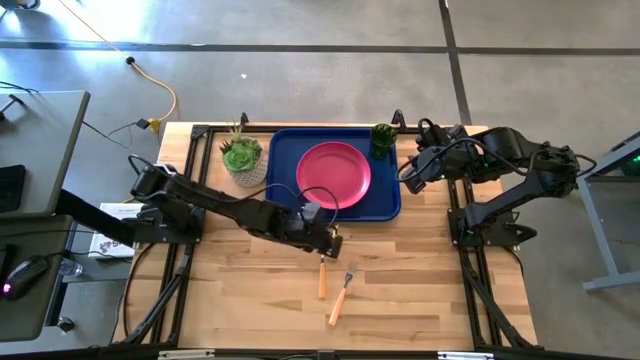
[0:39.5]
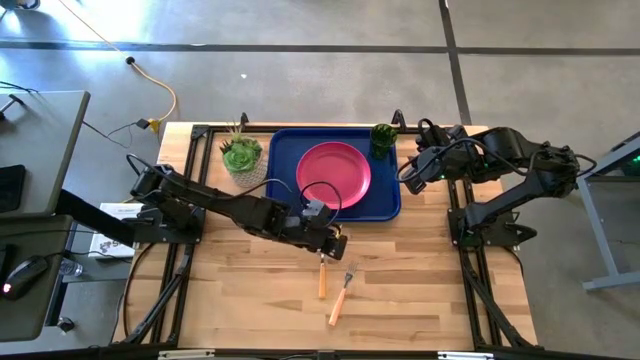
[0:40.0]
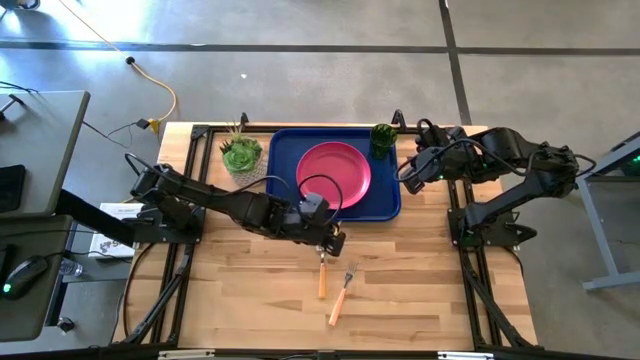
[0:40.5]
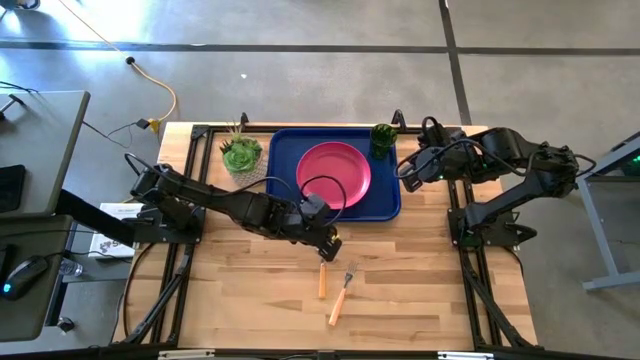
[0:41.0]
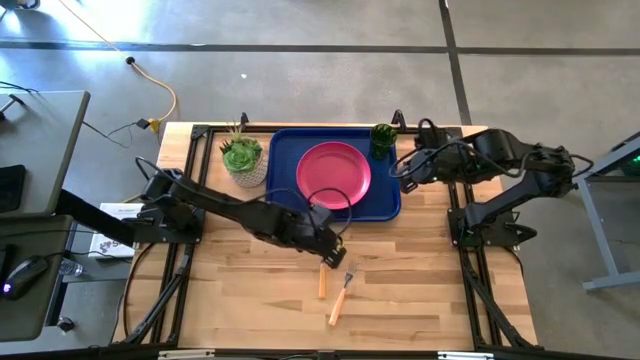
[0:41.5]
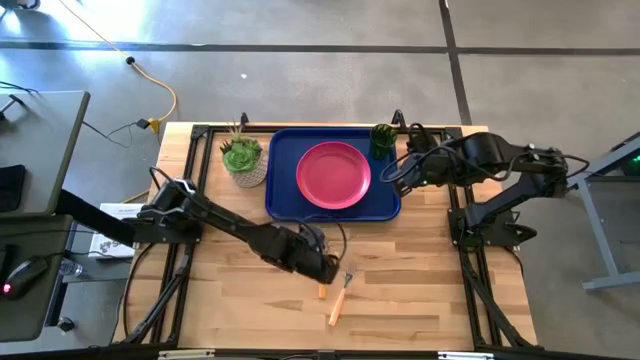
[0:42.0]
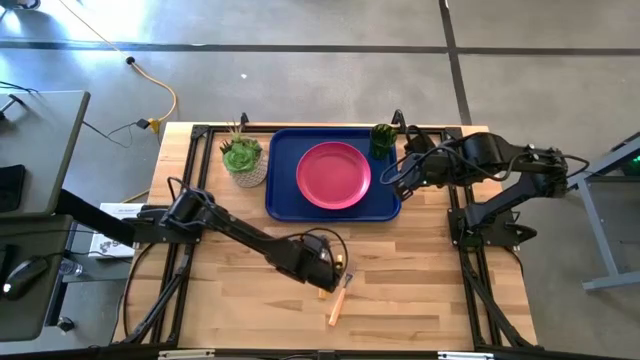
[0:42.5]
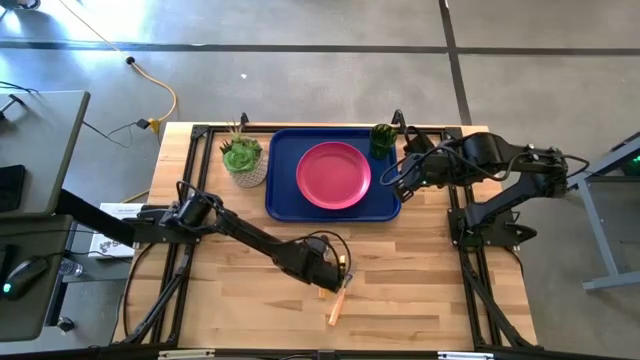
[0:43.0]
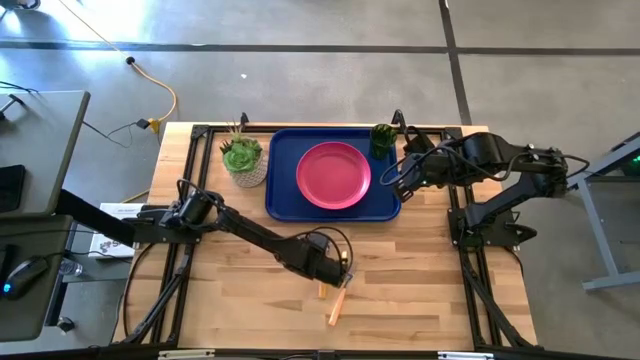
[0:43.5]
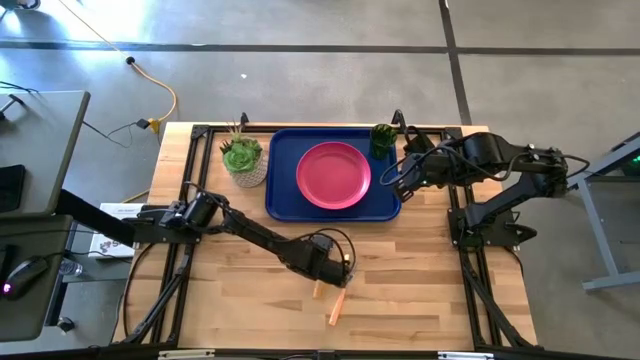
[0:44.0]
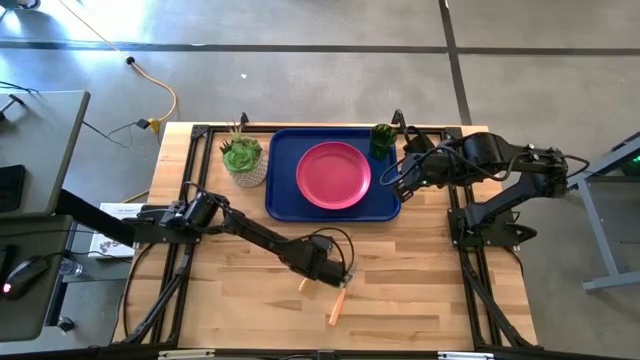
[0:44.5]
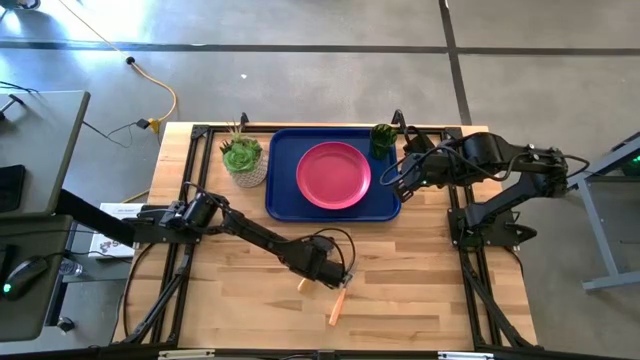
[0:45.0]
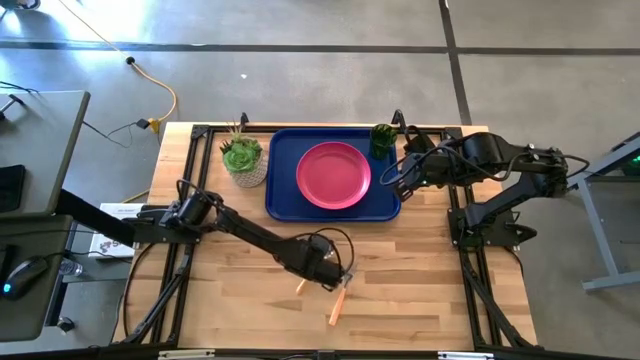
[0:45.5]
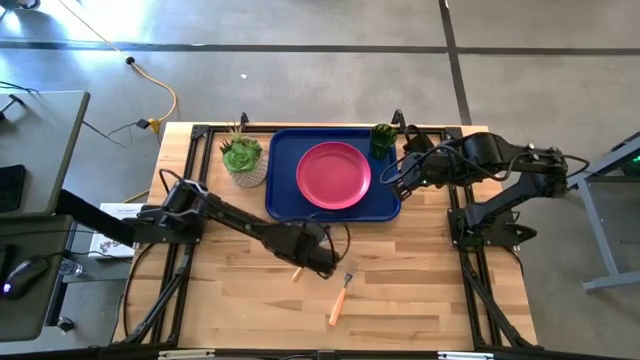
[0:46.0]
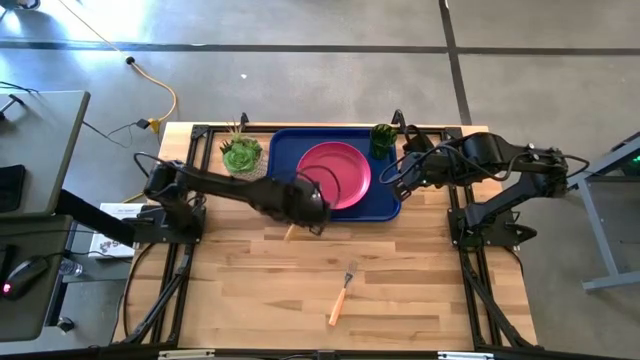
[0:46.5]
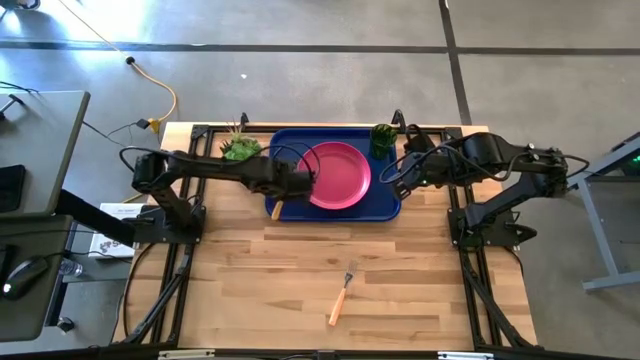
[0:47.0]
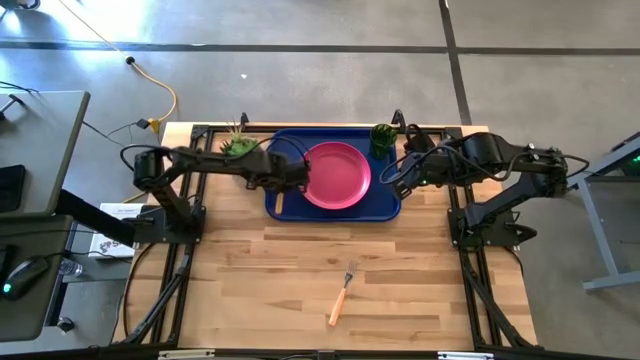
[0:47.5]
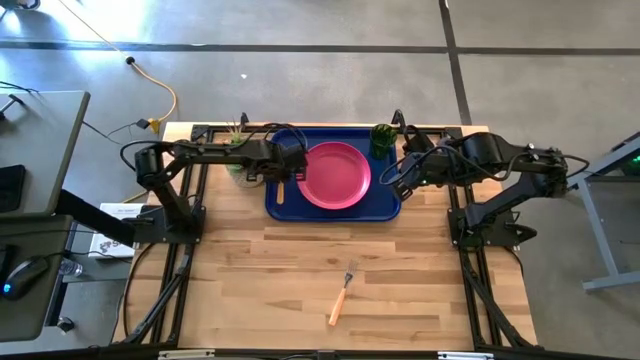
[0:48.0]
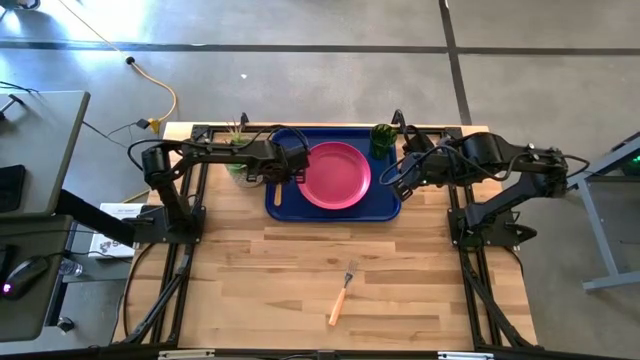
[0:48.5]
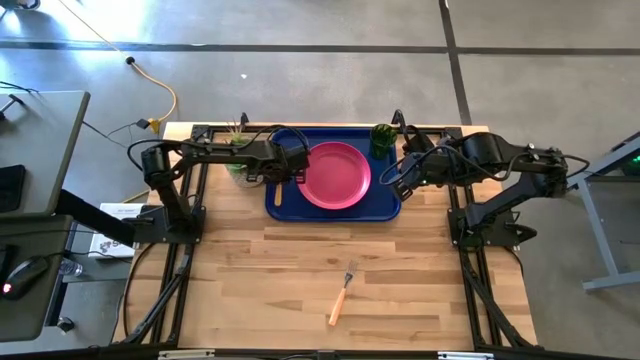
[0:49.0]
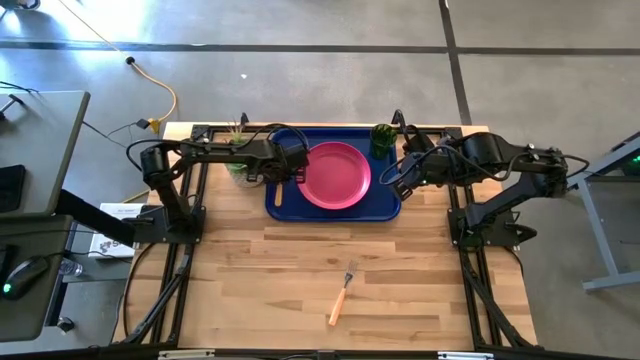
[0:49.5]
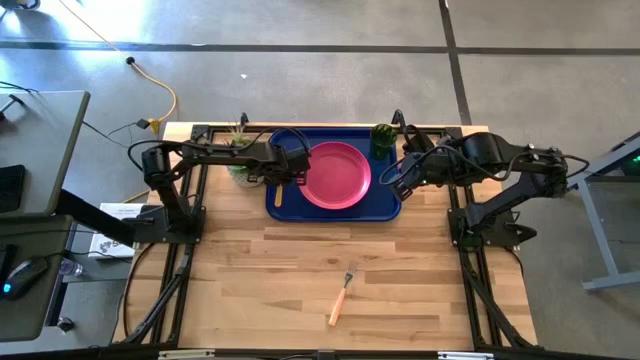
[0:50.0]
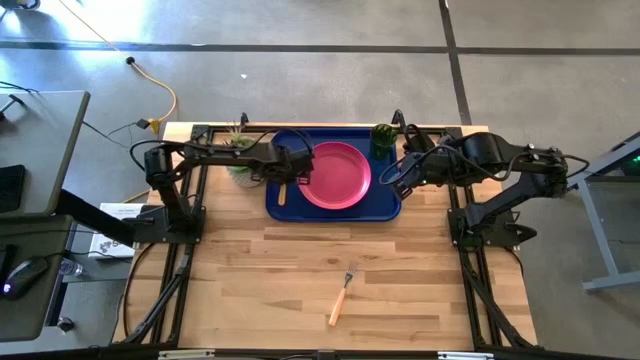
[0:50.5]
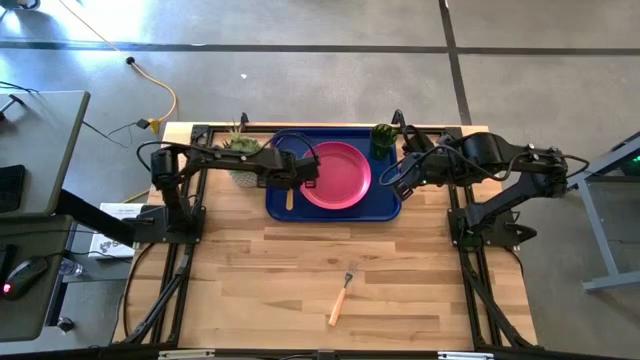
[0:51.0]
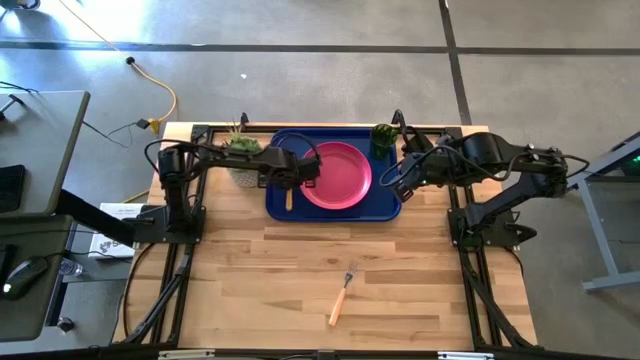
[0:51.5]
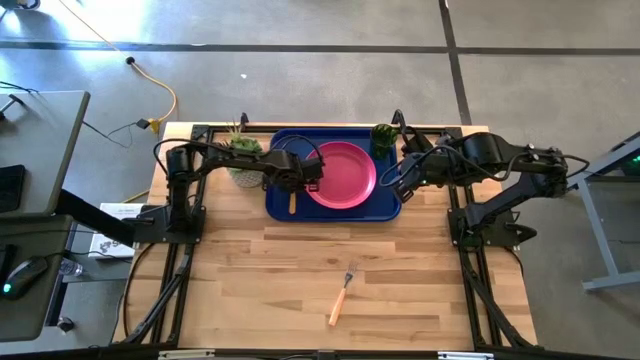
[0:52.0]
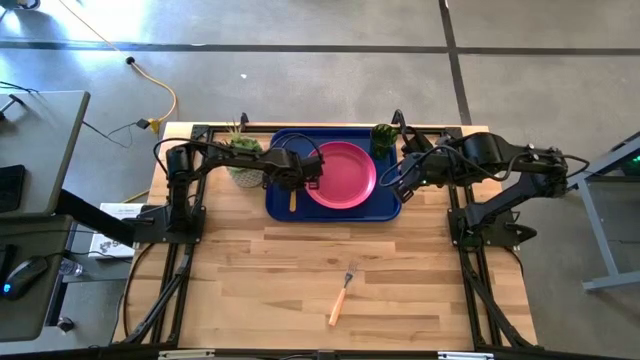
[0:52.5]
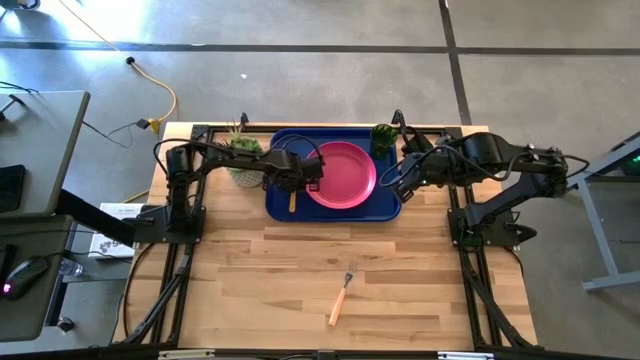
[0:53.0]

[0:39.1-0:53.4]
Task: Pick and place plate/cup/fork/spoon on tray
Put the orange spoon on the blue serving tray to the left side of the pink plate

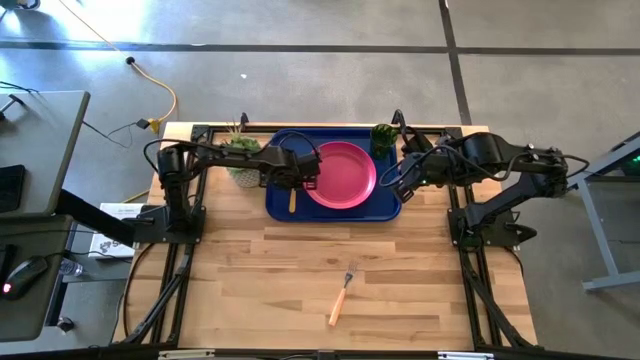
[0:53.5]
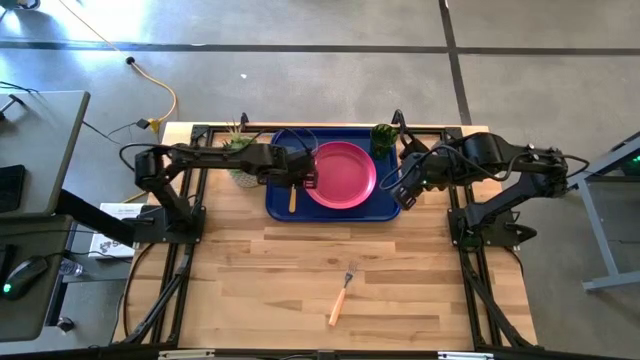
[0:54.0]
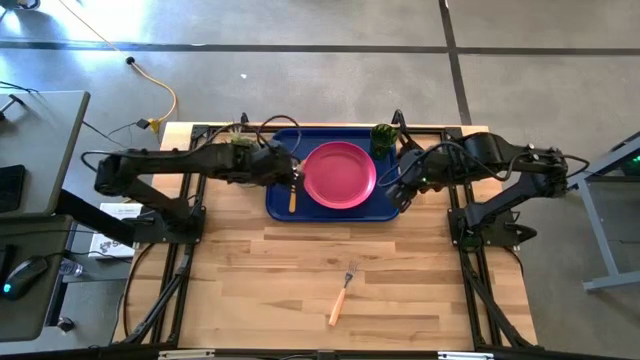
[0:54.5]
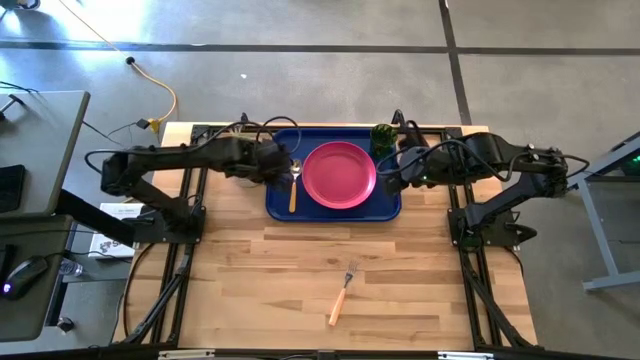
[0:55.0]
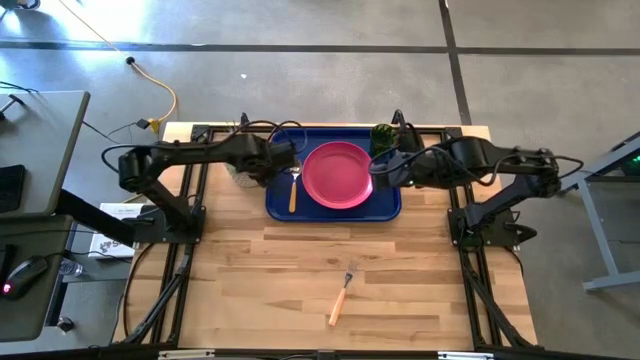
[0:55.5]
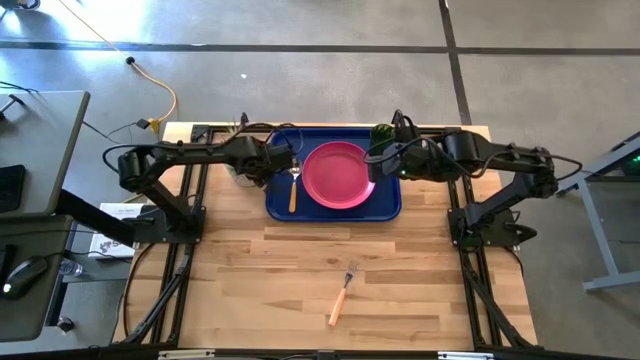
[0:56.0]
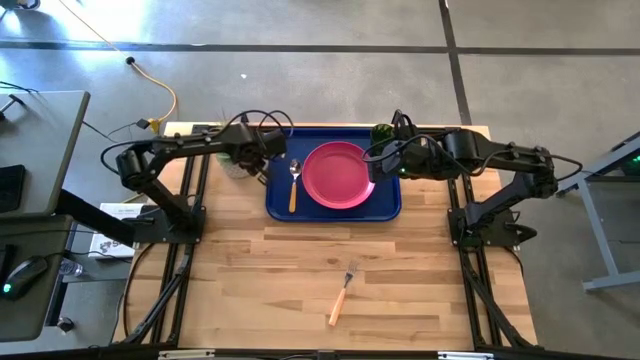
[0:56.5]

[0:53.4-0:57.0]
Adjust the potted plant position on the table

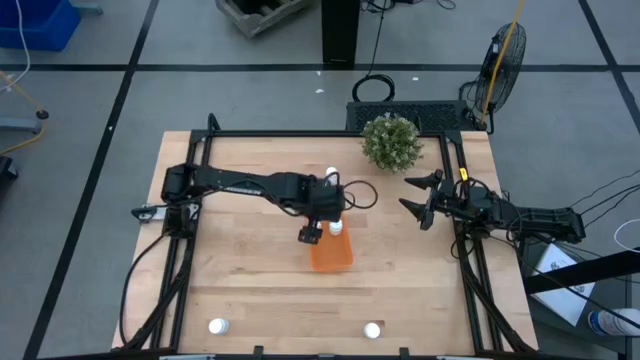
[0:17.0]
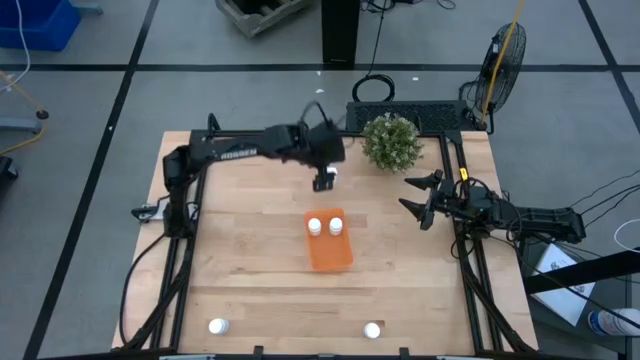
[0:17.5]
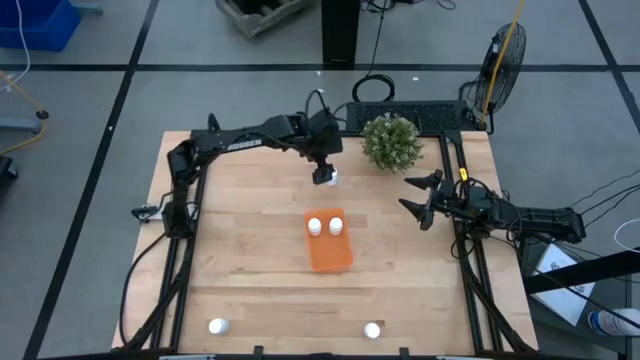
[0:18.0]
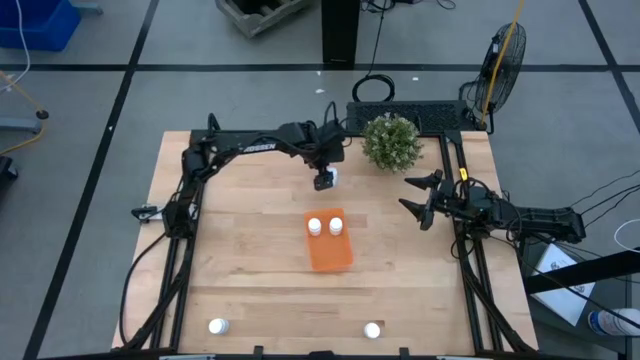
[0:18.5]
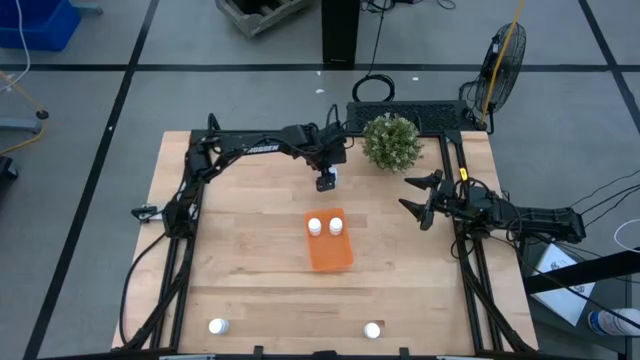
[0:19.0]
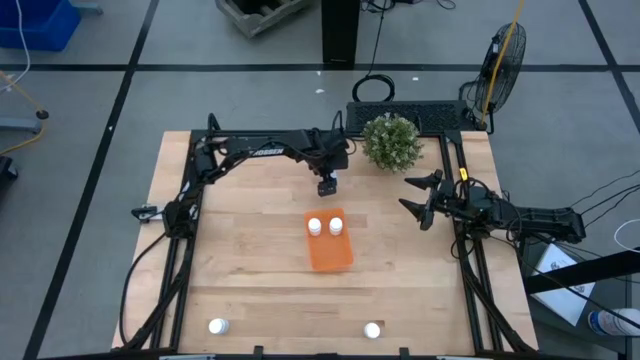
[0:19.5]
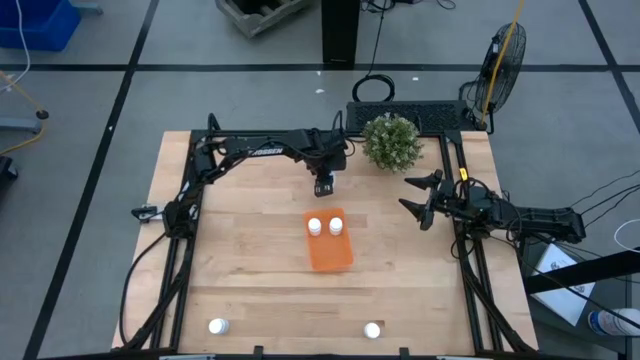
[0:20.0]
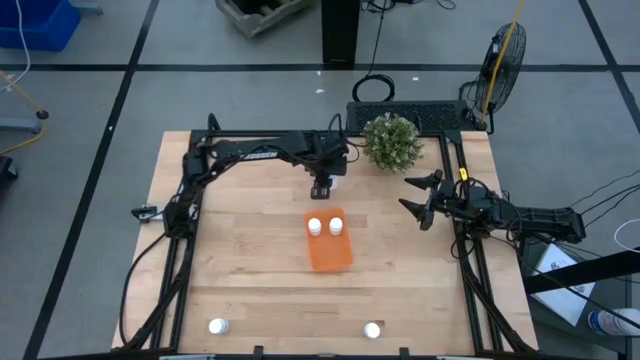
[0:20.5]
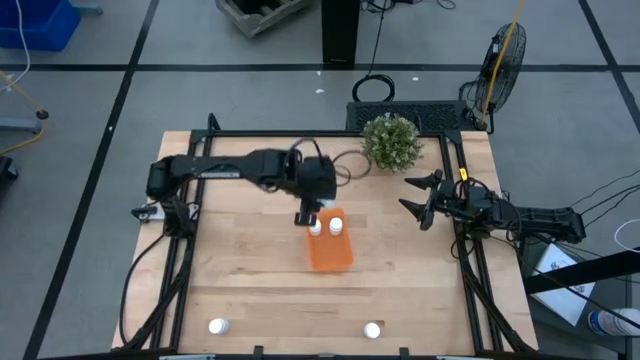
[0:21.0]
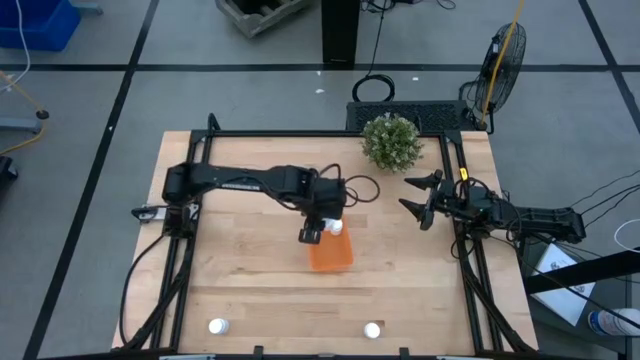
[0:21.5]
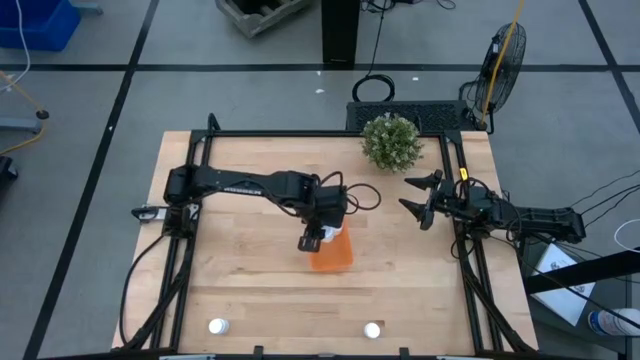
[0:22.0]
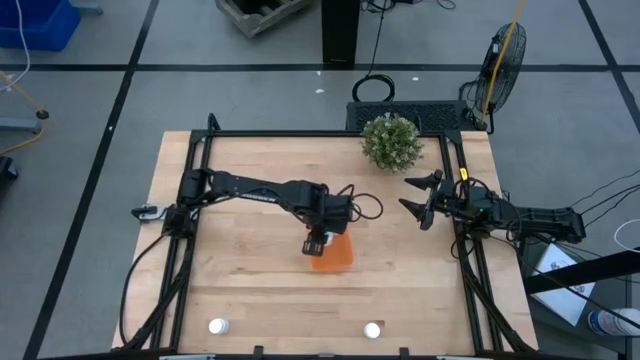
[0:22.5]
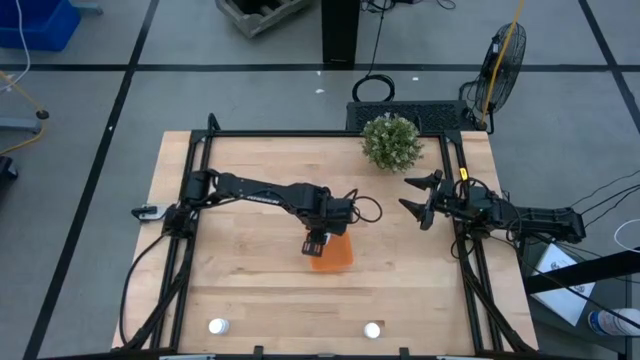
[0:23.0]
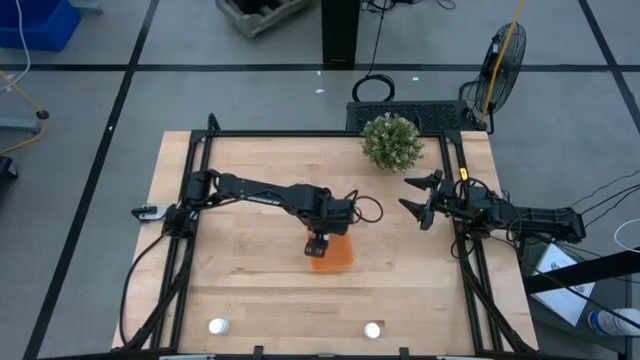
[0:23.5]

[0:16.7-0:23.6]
Task: Pick and place pill bottles into a basket
Put the white pill bottle into the orange container
